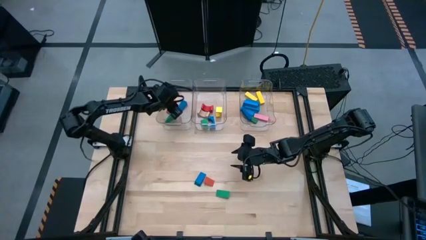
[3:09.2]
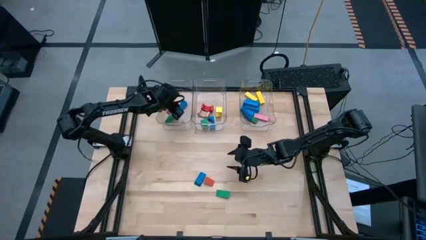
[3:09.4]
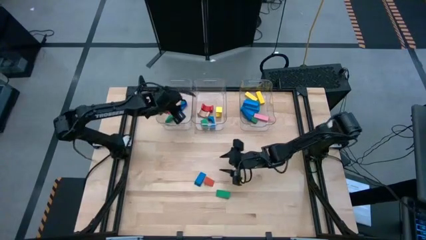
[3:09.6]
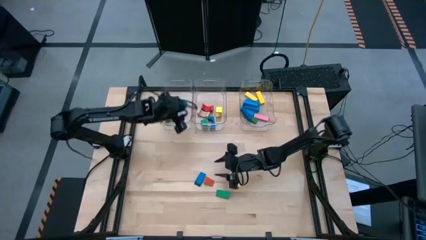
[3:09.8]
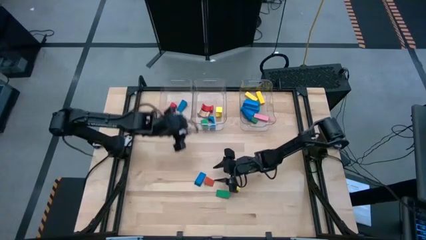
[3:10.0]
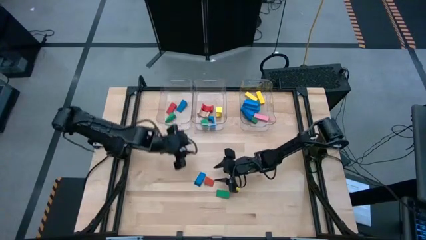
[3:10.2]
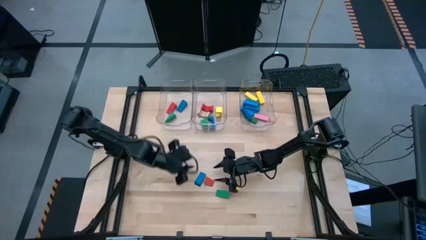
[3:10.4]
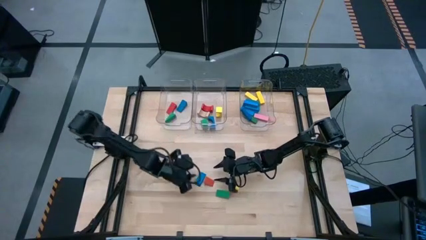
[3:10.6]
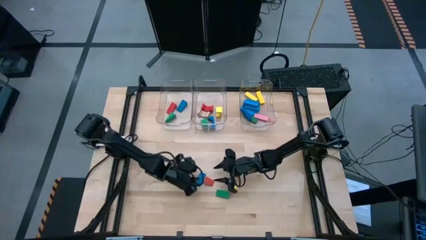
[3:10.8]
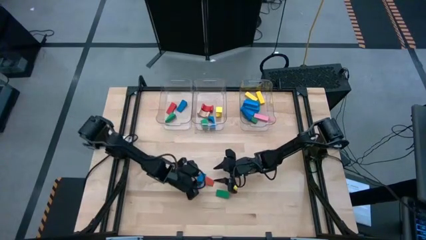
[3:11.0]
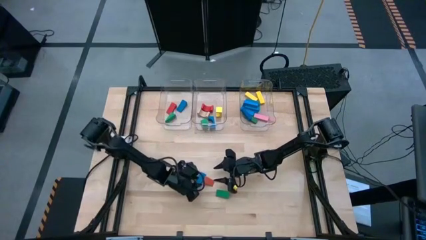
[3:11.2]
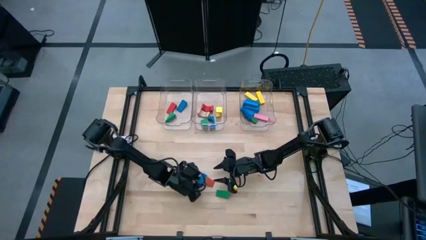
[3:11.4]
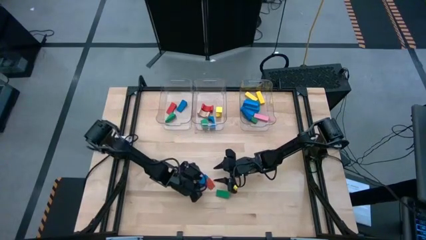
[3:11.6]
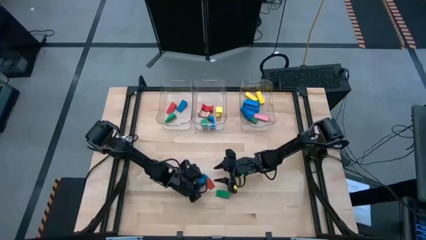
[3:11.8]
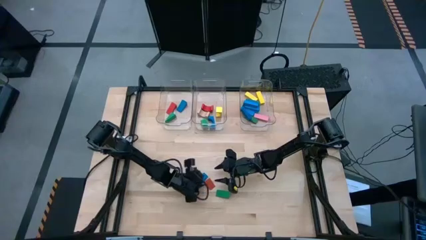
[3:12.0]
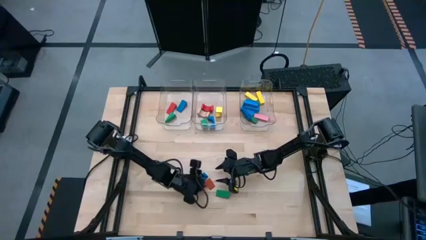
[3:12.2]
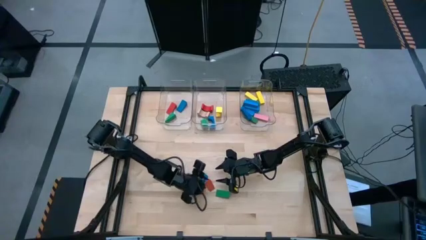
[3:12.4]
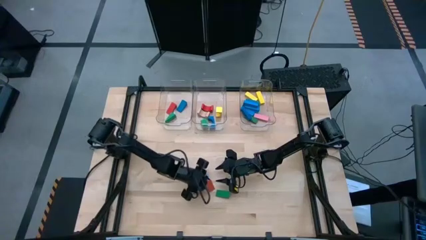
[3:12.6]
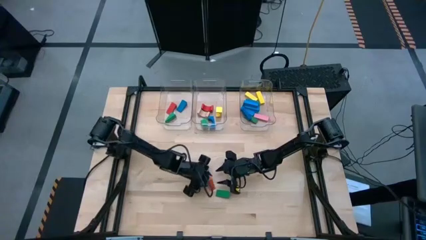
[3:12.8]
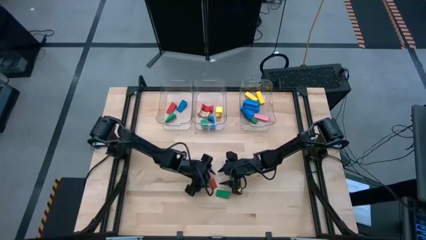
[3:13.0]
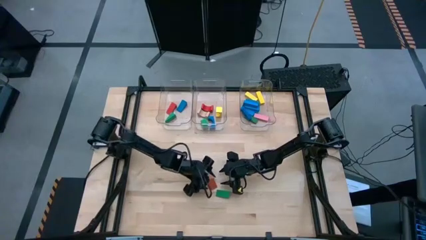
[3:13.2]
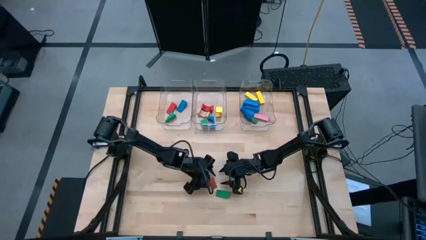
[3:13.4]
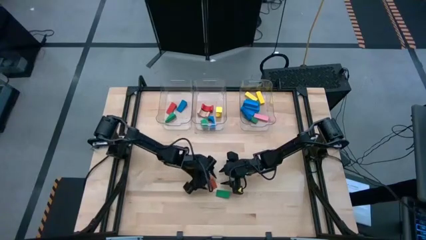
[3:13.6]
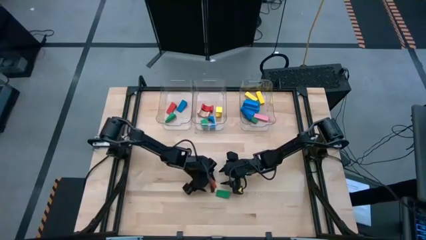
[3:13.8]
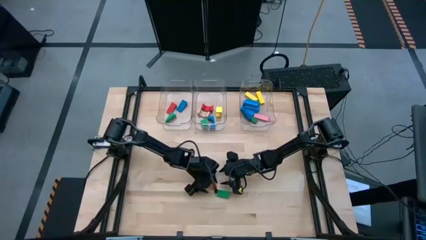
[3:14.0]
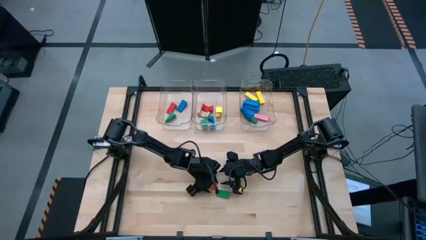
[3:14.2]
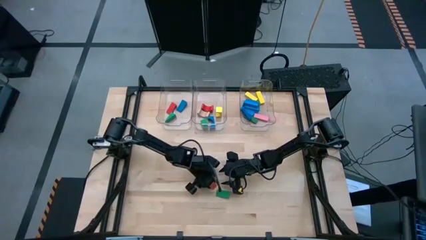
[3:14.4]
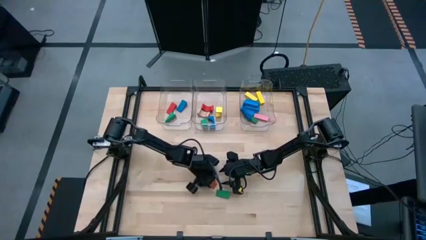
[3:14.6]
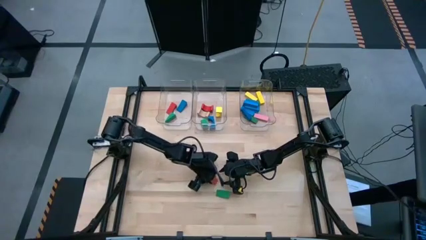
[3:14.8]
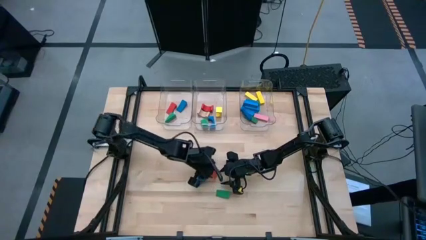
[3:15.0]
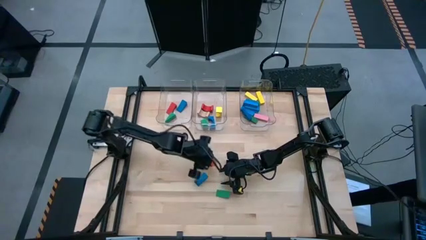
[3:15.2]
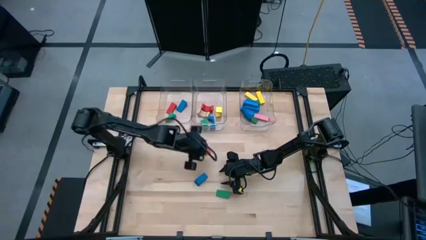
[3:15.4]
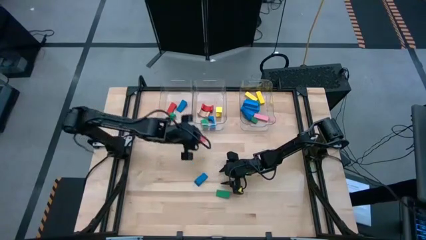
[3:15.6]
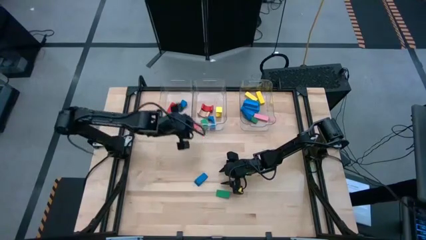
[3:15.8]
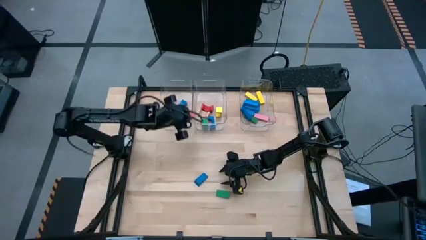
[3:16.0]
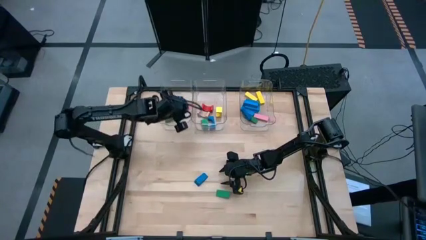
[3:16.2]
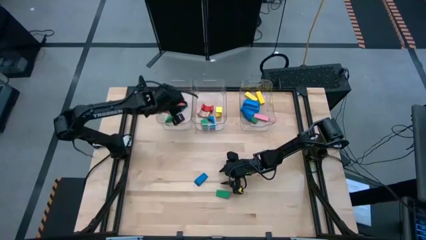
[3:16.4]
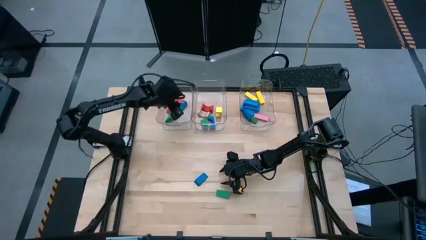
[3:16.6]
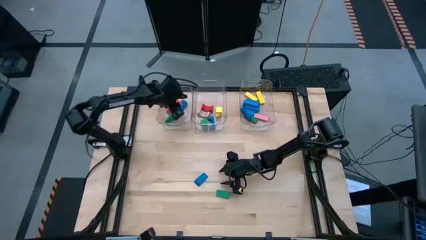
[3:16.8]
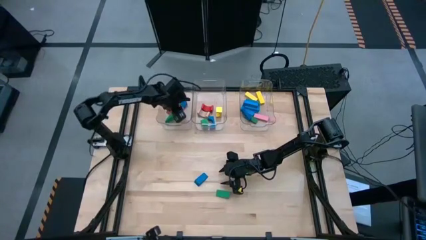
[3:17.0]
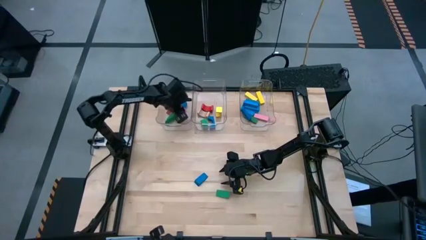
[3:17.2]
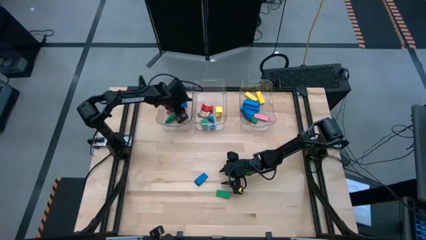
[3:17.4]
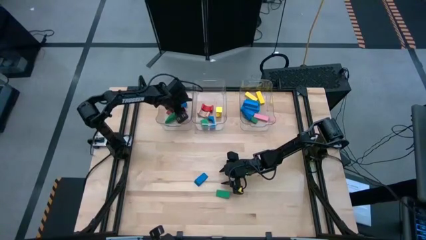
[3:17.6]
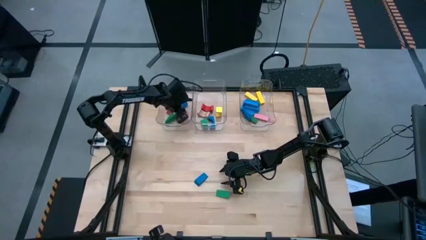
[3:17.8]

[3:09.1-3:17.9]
Task: Sort blocks by size
Put the orange triangular block into the left transparent bin

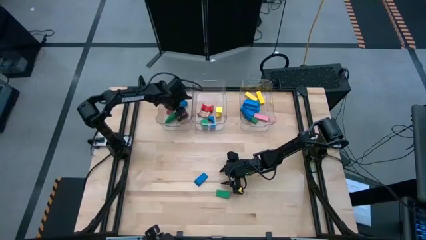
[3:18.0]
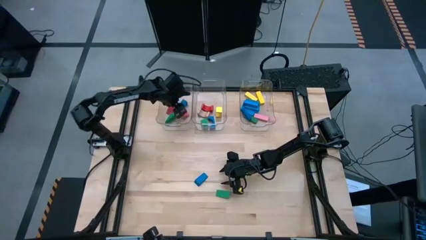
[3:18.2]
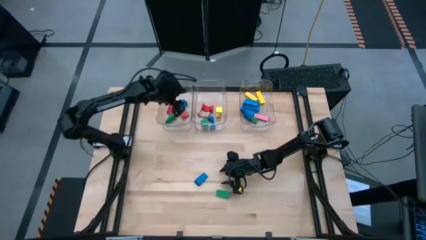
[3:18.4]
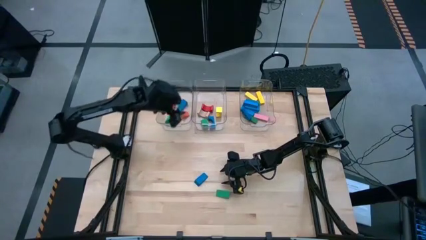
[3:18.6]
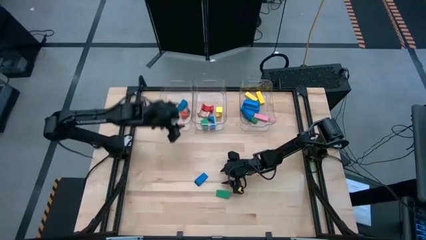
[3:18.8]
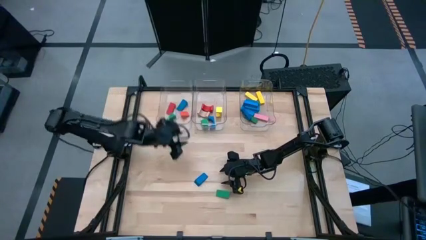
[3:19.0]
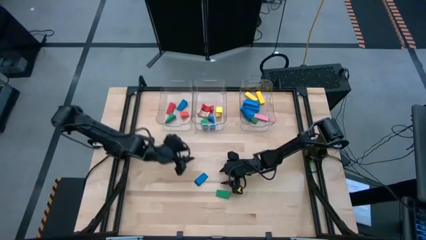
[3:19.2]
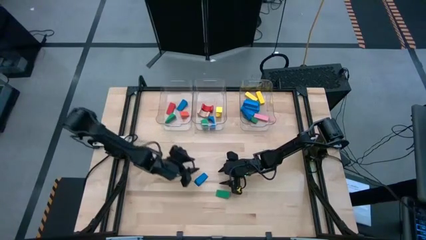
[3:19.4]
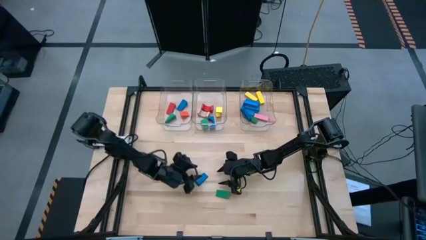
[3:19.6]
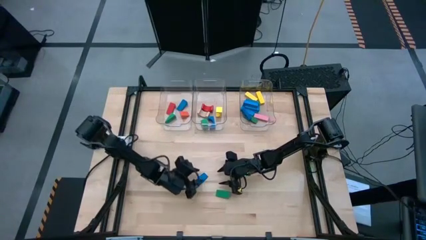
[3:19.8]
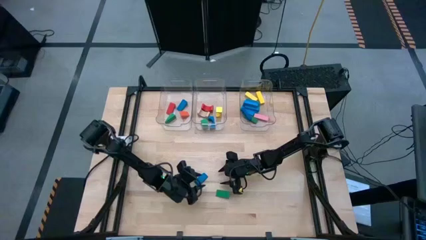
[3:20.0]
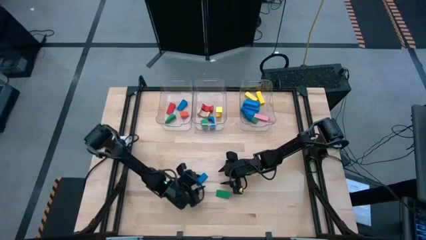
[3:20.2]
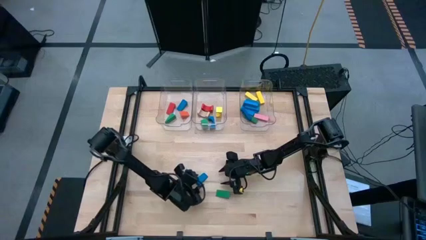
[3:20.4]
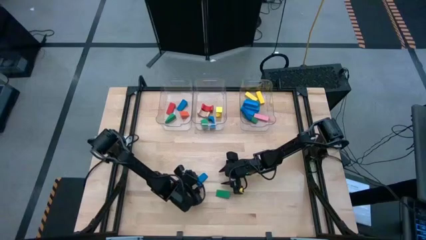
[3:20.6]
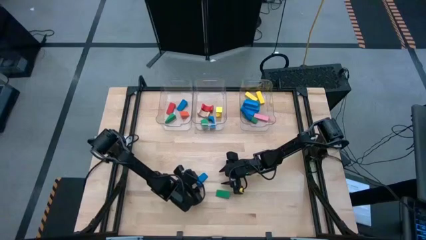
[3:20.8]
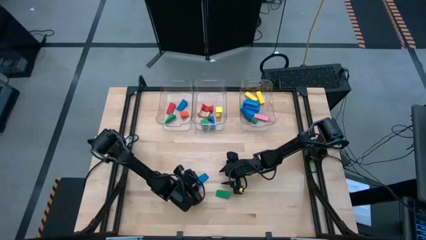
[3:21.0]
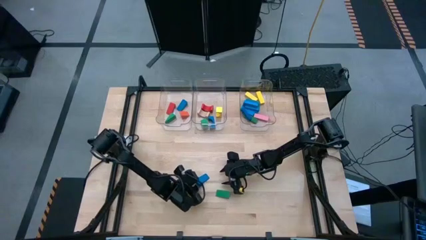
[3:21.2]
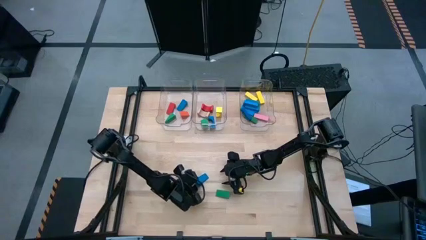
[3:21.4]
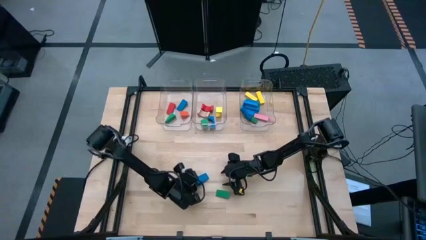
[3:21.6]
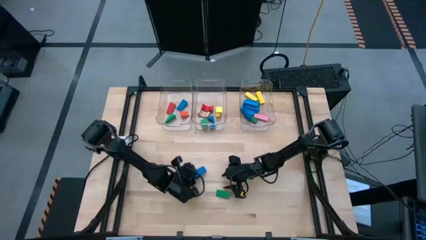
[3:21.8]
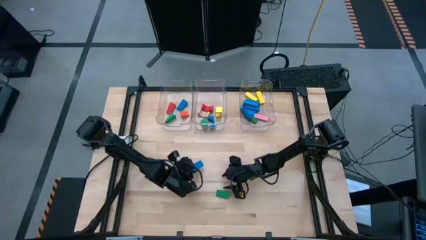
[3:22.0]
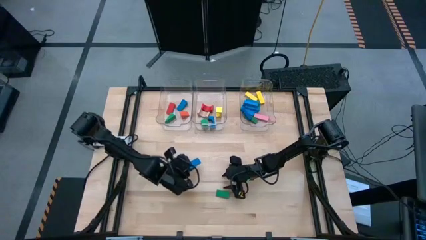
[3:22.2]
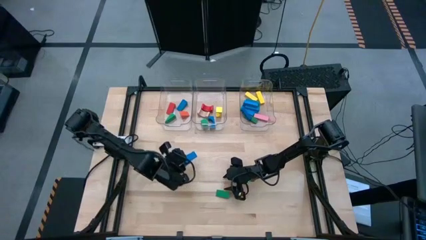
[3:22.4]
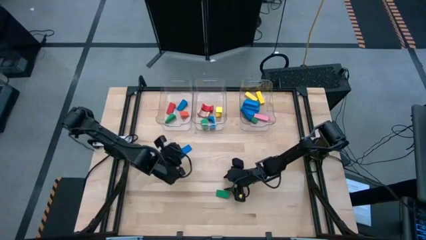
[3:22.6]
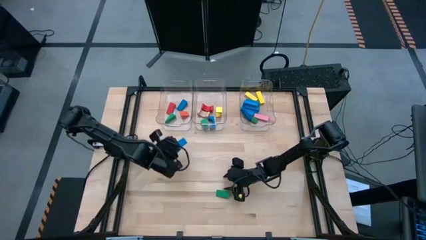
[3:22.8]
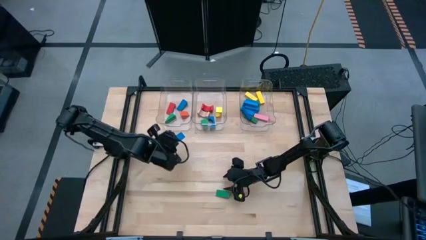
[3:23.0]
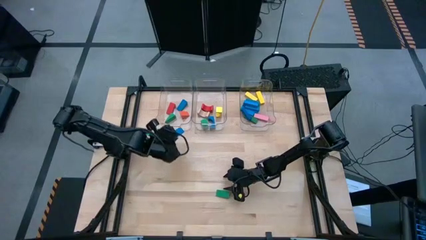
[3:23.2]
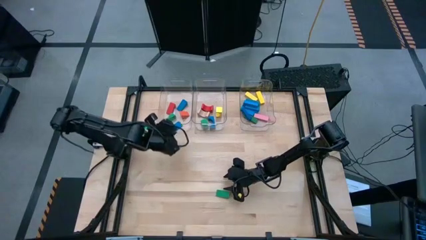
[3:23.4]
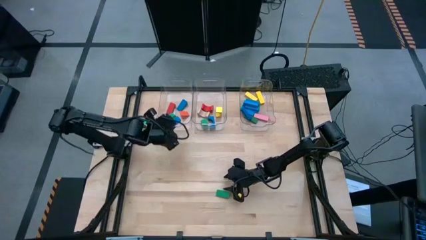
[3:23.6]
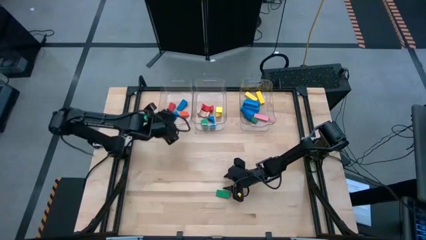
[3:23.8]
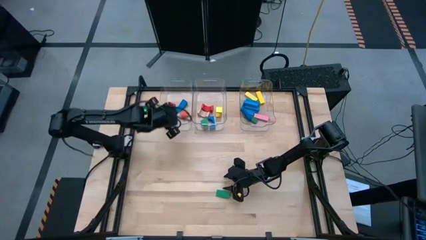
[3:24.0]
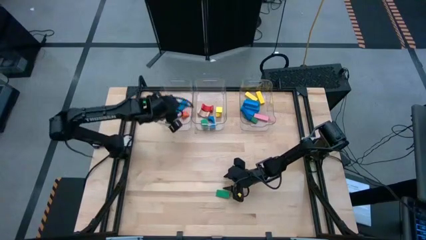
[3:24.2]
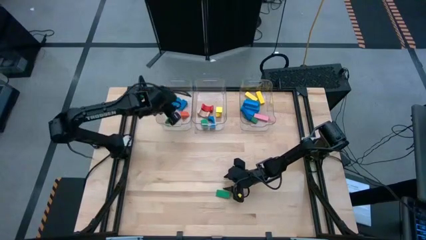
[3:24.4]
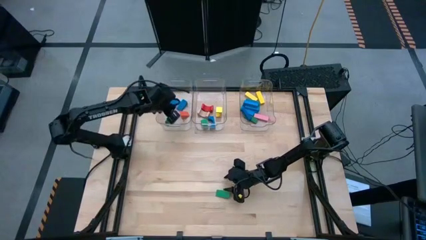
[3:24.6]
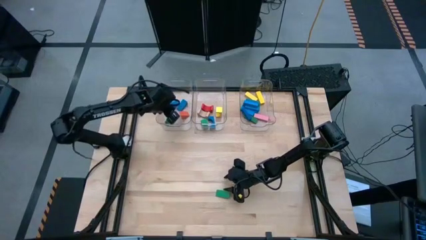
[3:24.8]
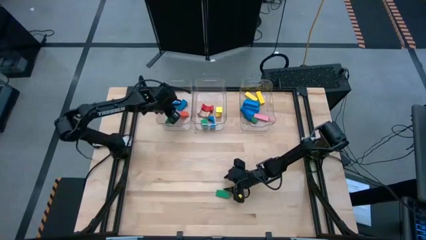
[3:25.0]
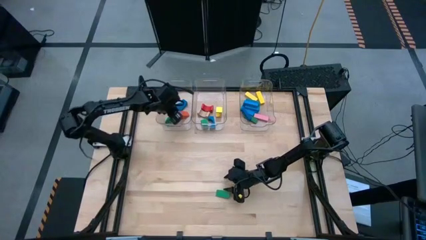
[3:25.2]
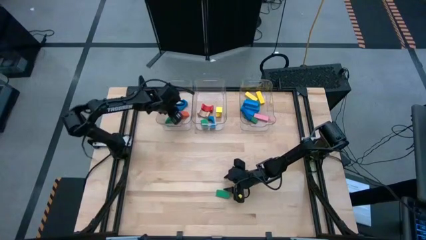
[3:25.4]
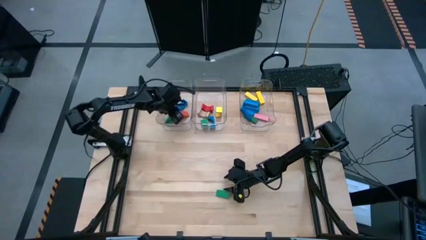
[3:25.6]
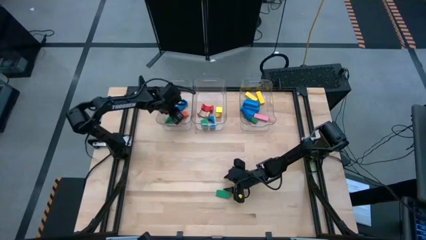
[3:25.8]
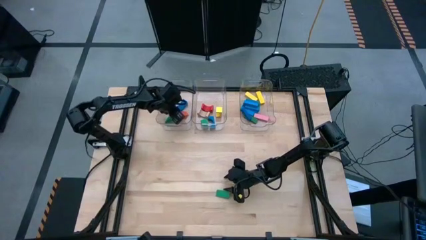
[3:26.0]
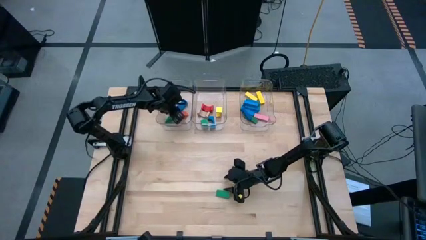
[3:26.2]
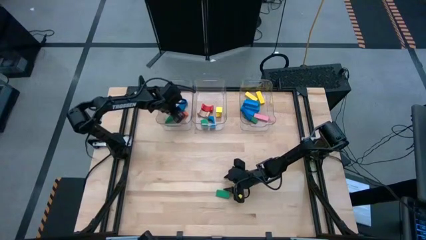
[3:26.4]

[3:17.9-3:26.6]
Put the blue triangular block into the left transparent bin
